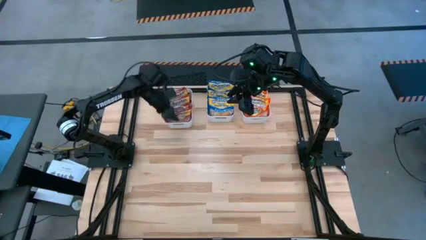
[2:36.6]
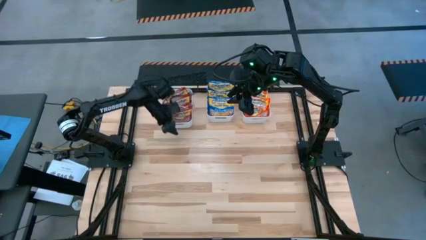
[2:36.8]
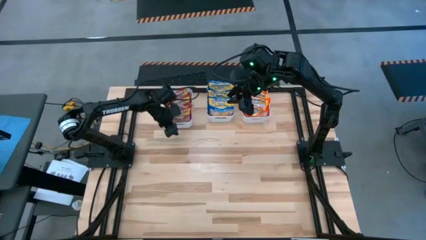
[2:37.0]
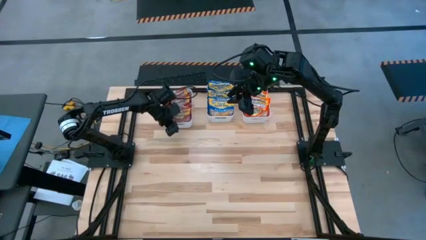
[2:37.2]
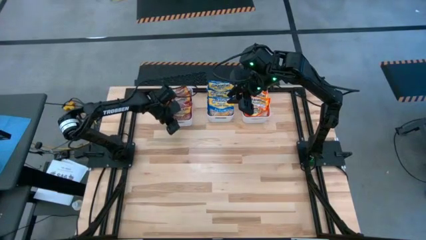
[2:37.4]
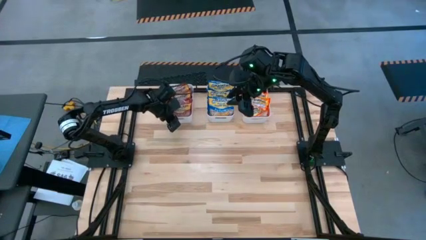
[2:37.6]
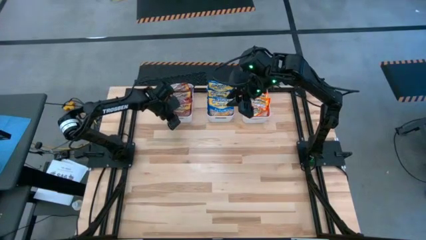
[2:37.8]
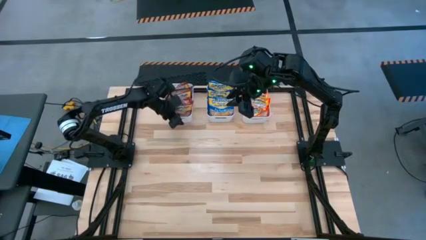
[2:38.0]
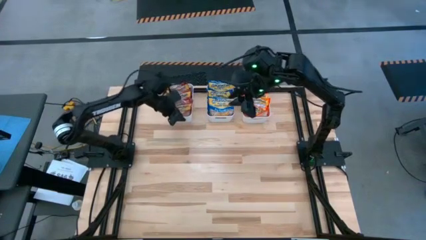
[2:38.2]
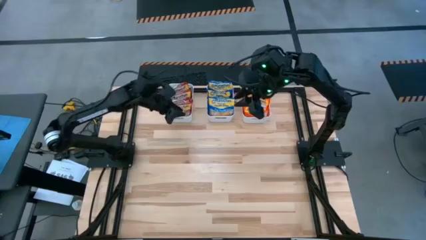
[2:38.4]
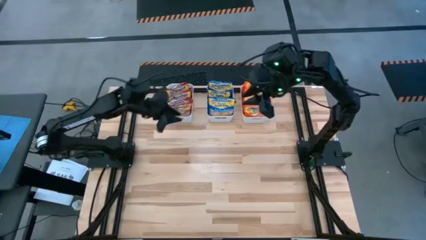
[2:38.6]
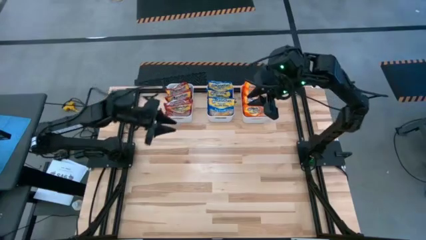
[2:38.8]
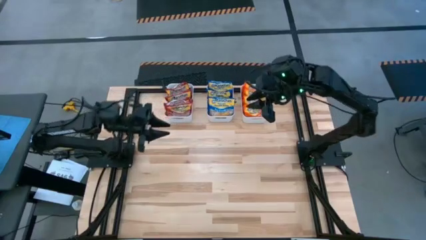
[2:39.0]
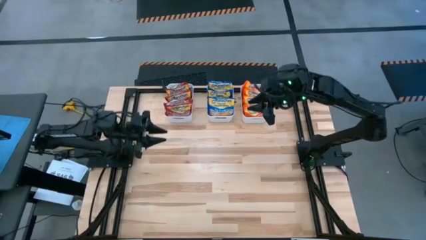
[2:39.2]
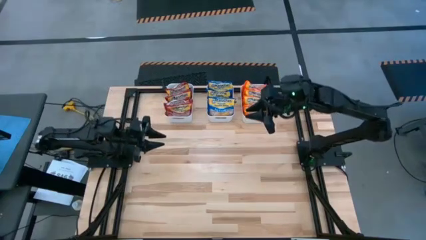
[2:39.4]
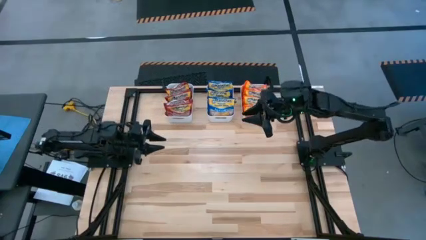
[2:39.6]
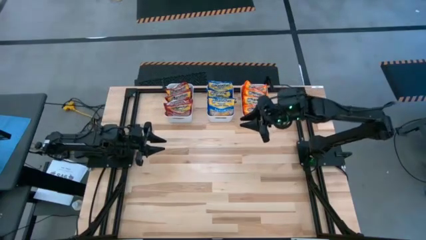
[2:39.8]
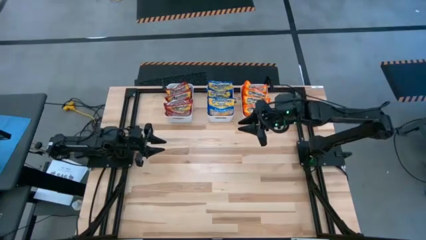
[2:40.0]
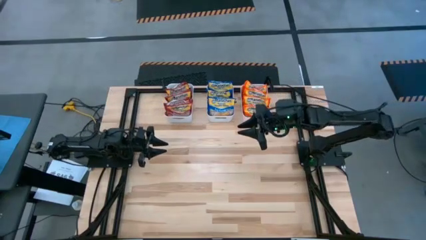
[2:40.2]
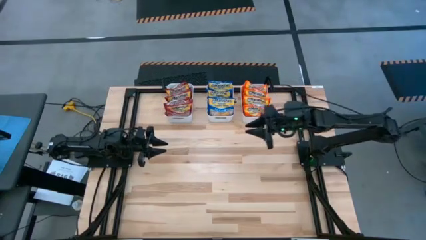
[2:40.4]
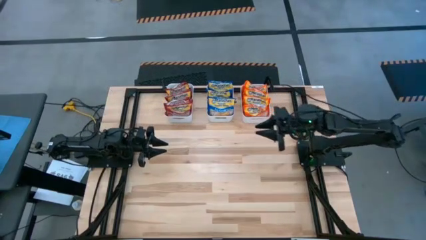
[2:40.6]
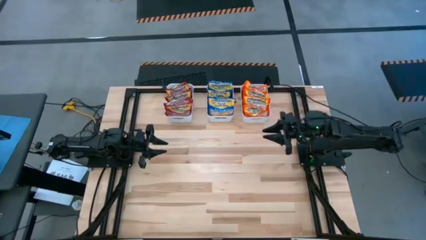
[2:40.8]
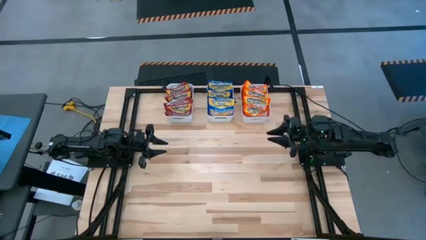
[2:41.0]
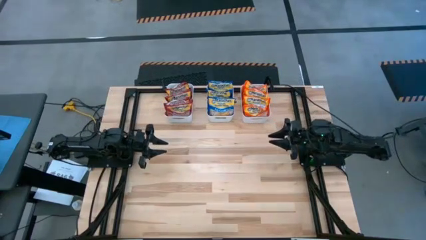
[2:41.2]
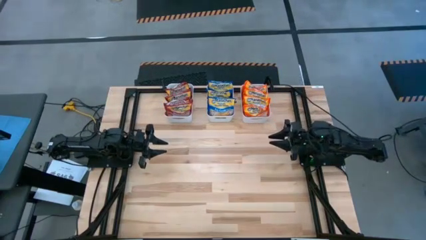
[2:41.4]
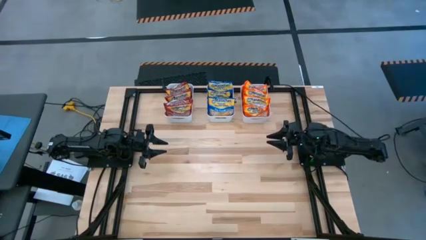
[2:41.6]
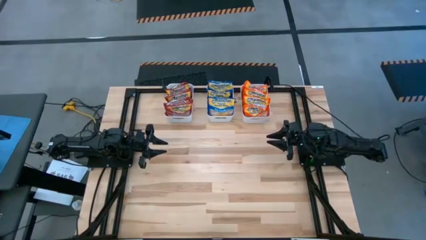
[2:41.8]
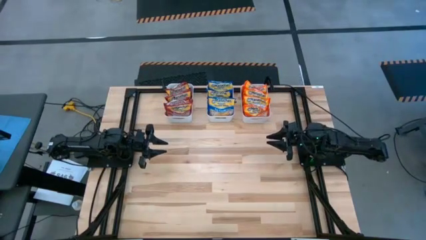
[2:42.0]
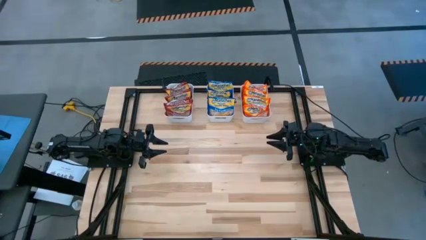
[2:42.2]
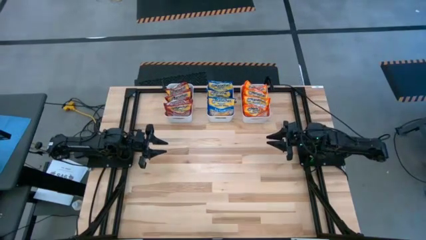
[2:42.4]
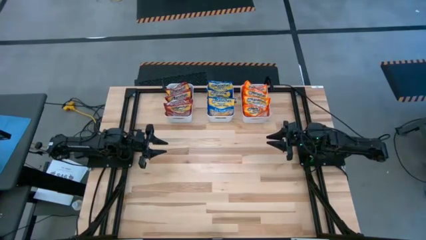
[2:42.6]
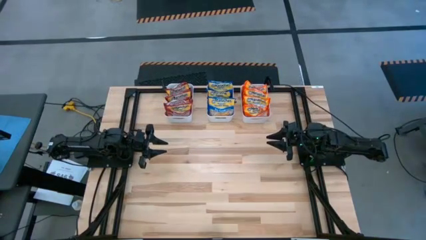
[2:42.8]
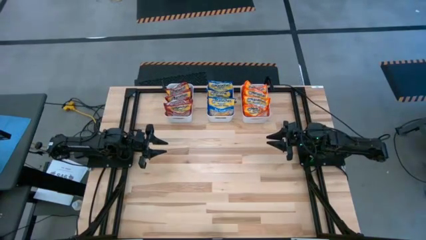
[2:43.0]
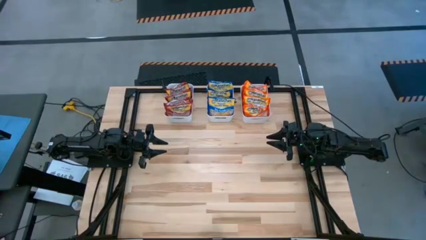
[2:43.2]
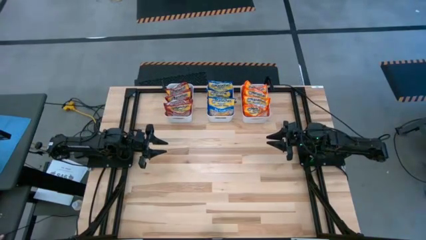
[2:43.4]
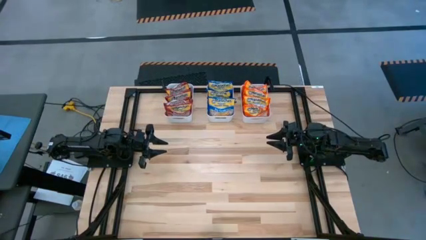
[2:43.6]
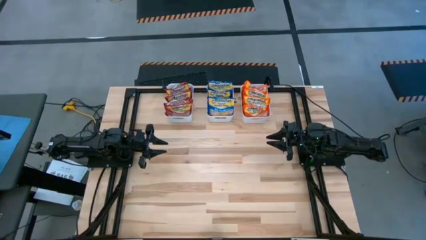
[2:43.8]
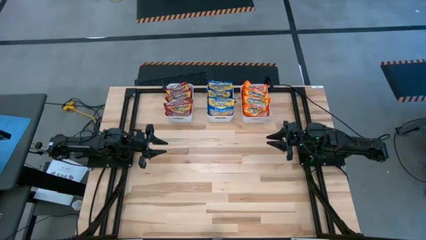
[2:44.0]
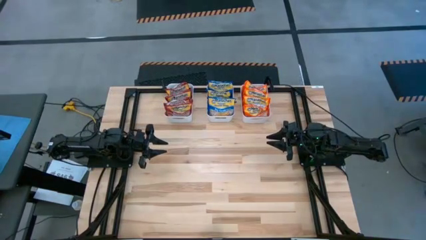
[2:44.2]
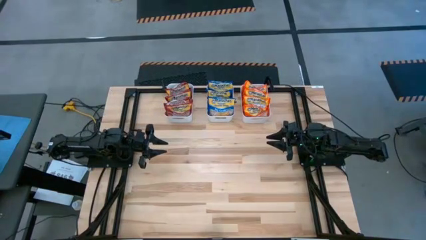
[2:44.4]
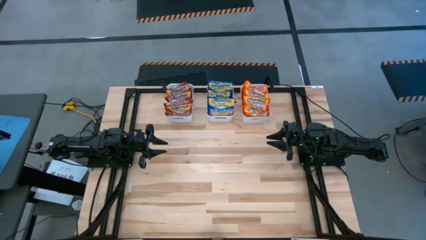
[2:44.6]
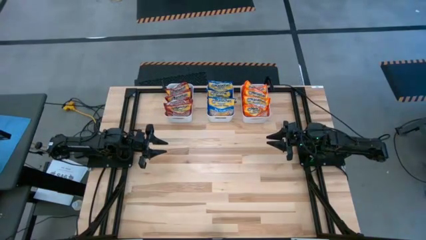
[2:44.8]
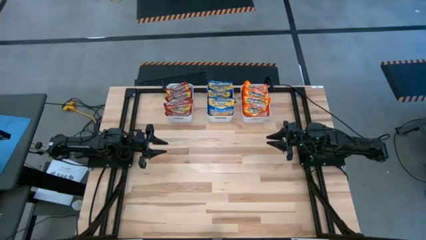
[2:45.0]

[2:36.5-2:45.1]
Task: Sort Maruchan noodles
Return to Home Position

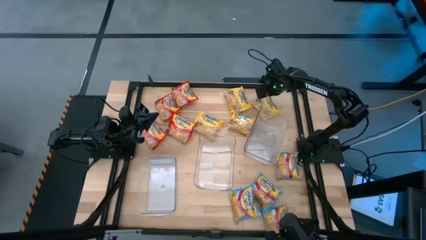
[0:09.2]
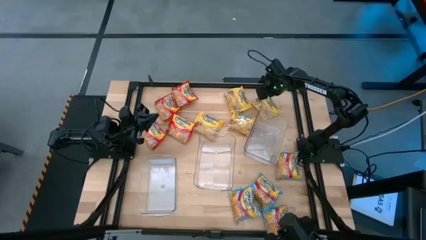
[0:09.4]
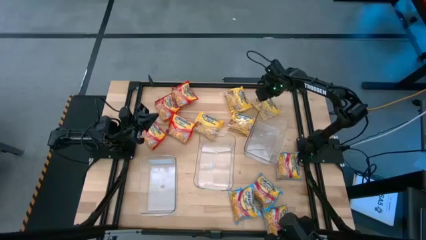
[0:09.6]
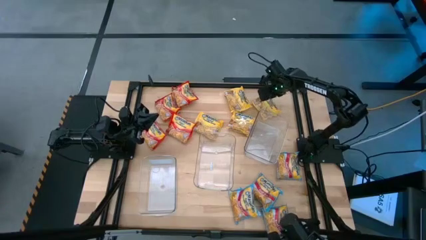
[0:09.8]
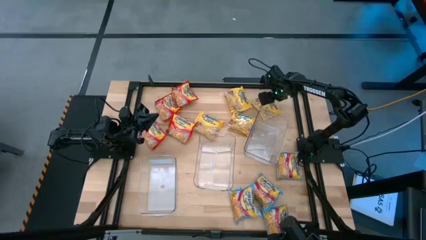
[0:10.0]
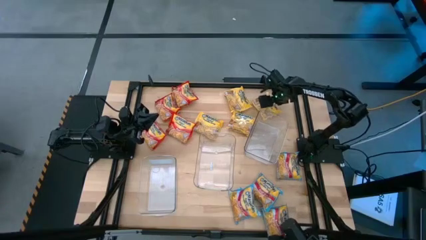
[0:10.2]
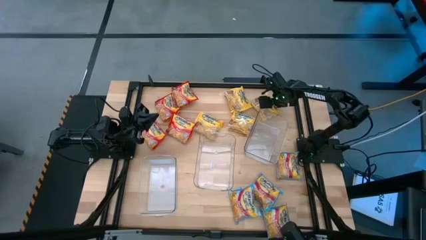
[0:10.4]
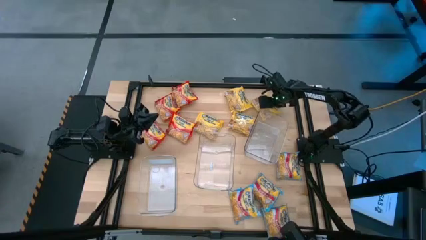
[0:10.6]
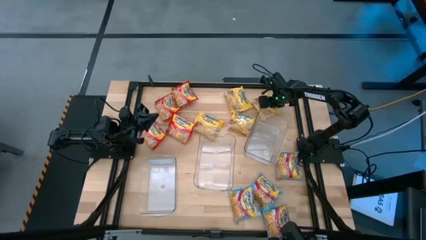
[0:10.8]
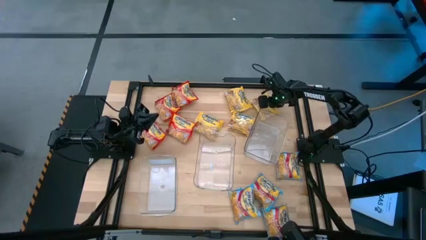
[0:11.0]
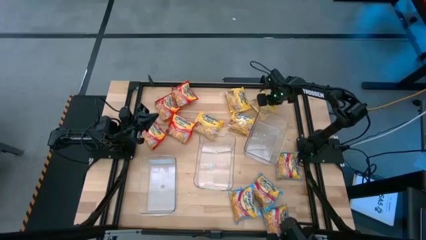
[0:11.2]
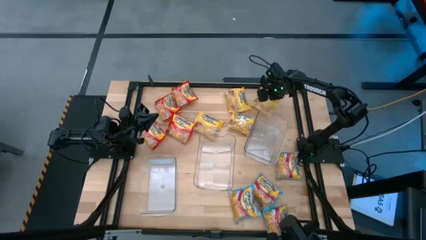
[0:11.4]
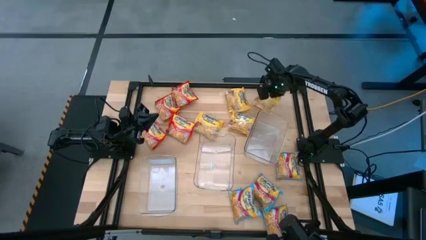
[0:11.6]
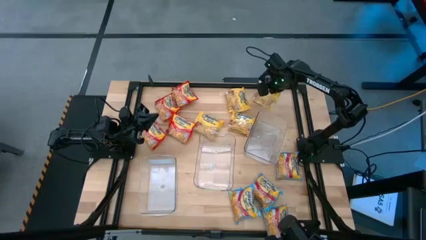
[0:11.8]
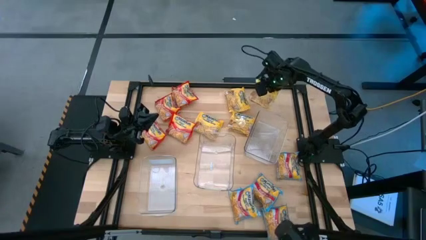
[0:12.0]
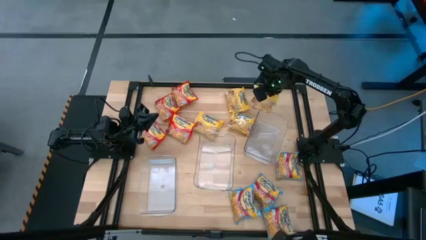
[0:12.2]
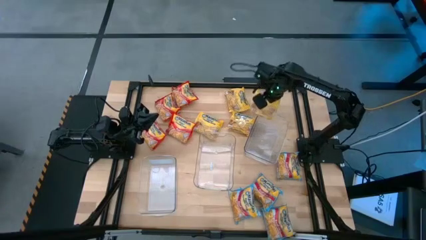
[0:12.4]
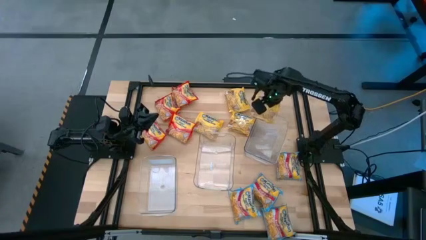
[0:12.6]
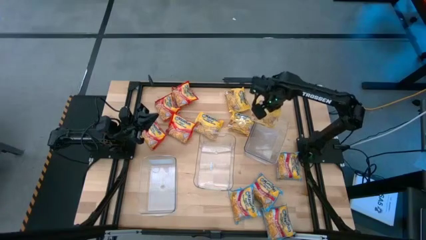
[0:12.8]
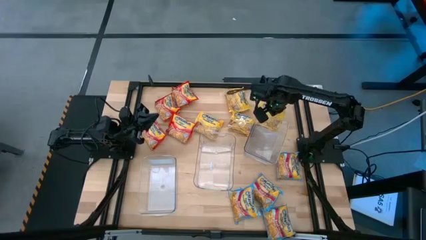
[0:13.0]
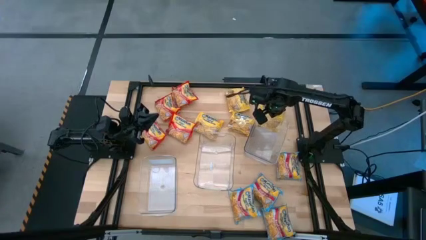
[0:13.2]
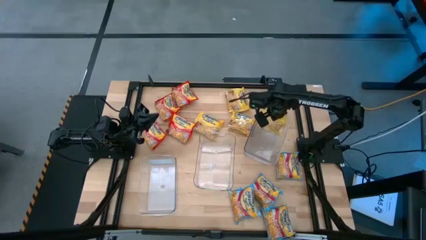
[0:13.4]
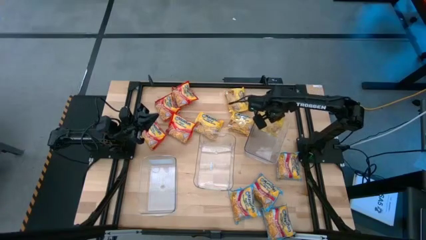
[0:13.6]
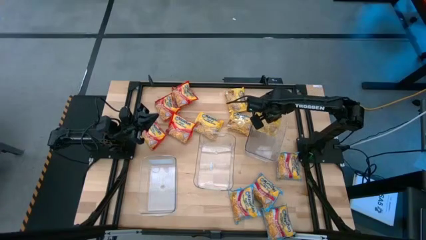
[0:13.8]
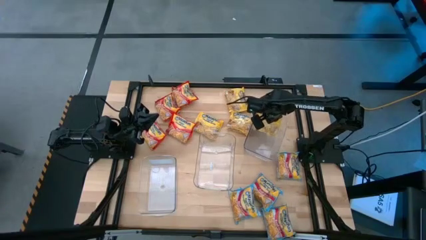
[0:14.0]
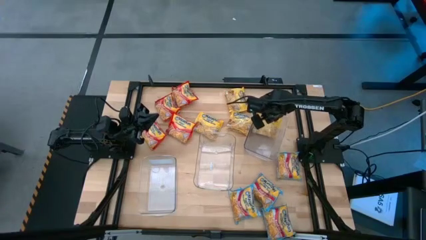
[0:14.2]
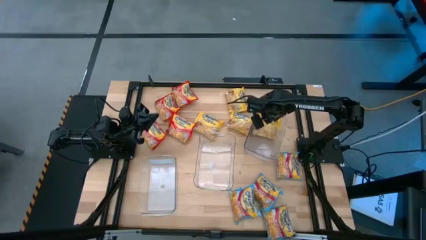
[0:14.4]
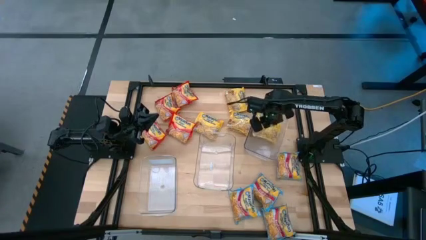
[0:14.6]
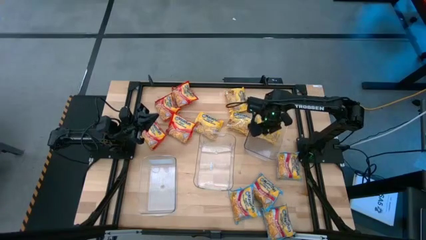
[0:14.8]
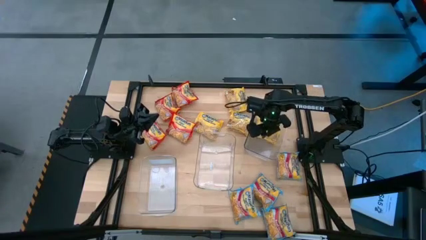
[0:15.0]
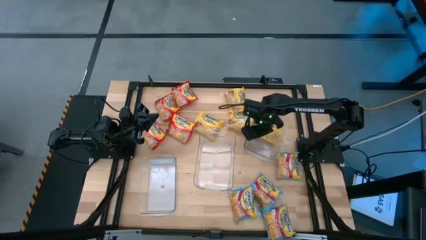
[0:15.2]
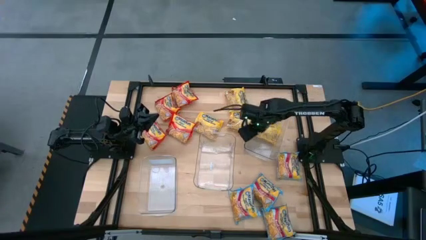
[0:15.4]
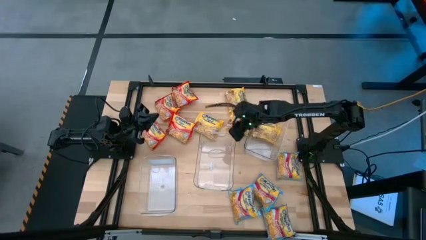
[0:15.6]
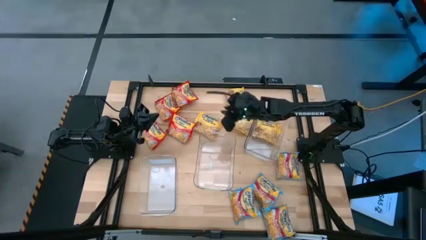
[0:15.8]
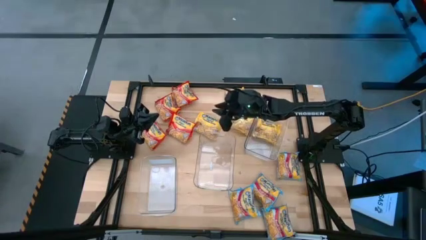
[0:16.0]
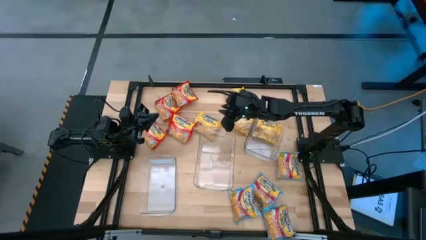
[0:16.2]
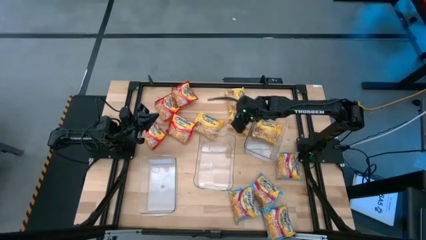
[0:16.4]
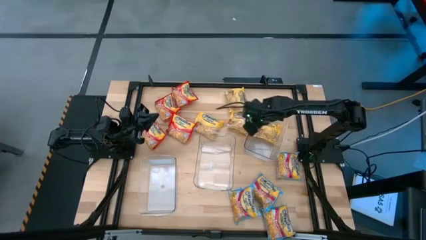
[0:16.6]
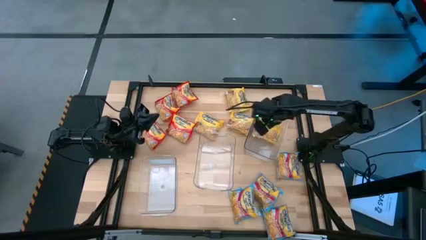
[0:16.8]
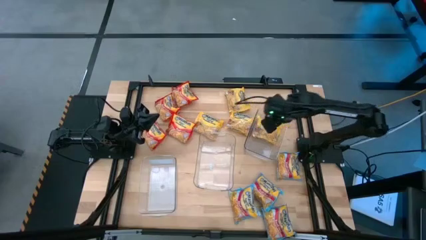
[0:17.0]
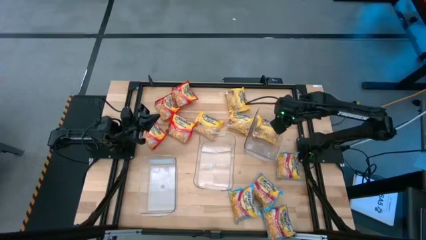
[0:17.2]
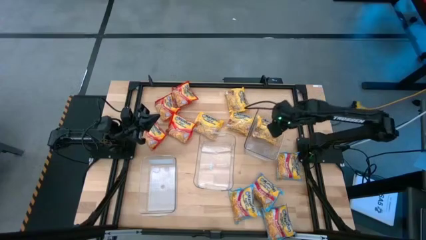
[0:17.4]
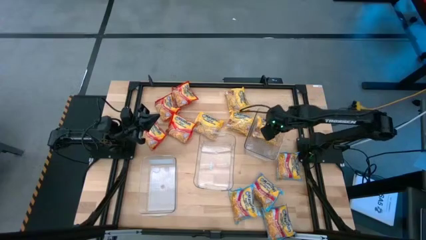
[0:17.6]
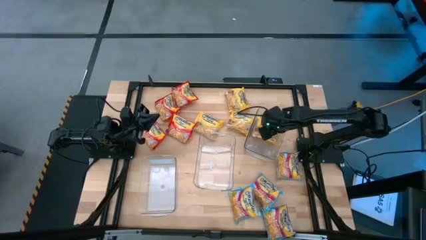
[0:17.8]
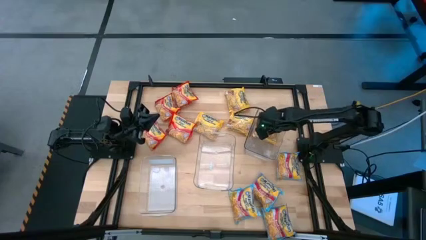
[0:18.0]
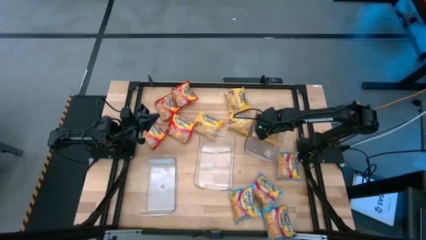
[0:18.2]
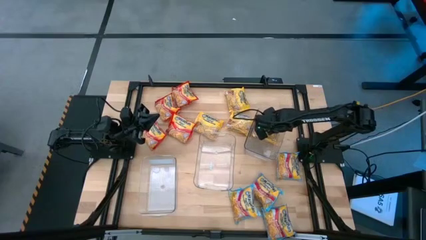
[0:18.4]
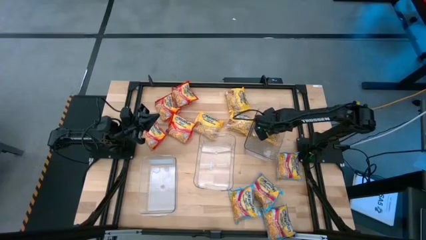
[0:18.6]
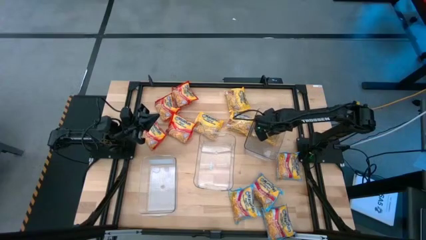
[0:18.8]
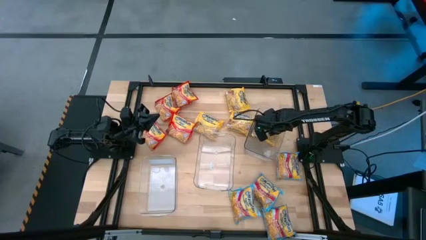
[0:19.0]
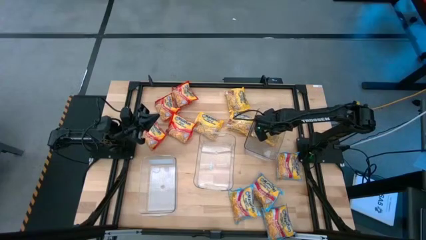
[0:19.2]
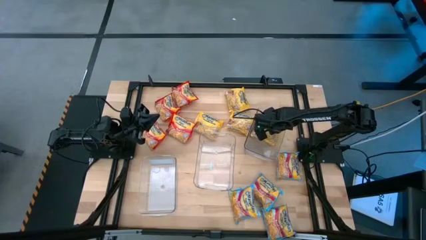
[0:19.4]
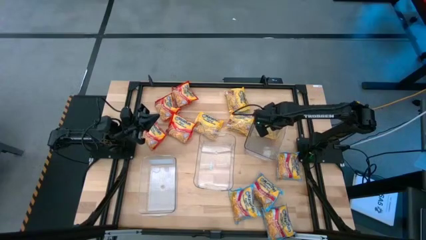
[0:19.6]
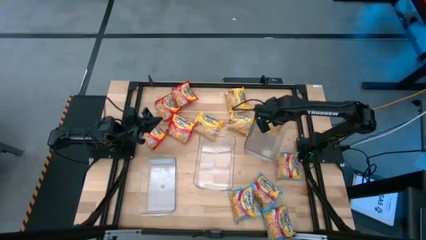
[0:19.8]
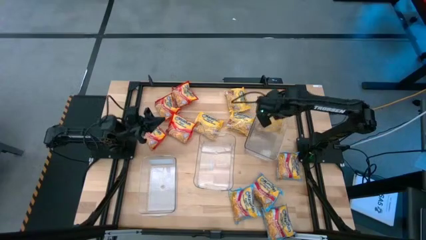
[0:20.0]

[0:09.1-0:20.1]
Task: Sort Maruchan noodles
Put the yellow noodle pack into the right transparent bin
